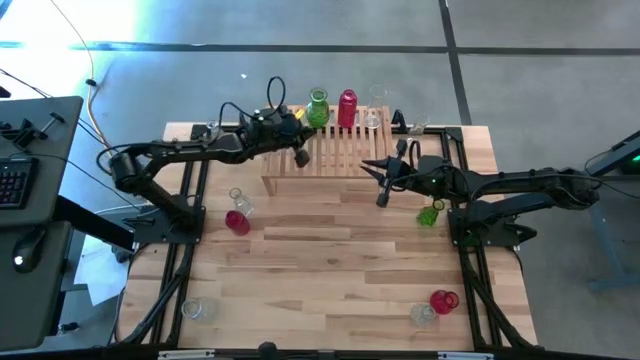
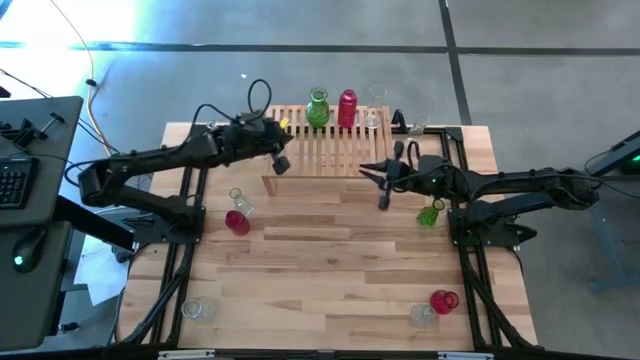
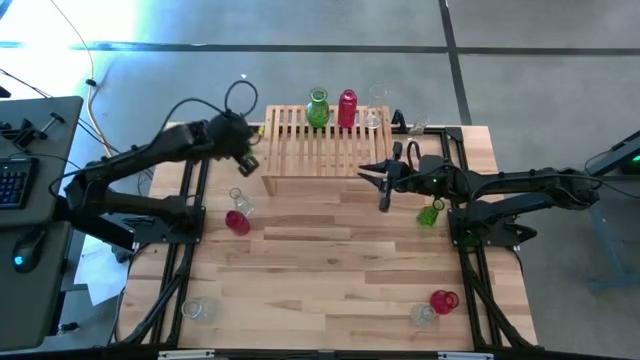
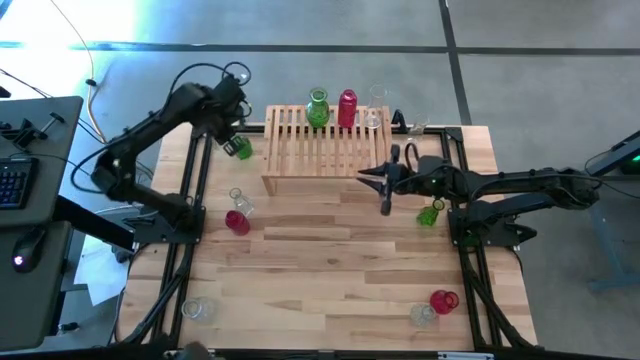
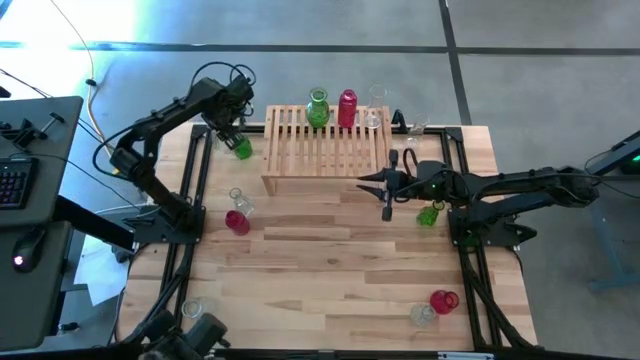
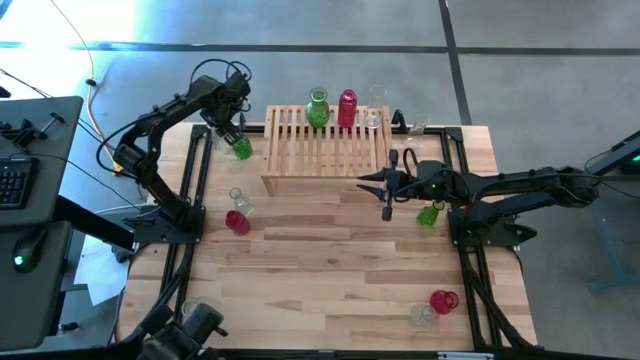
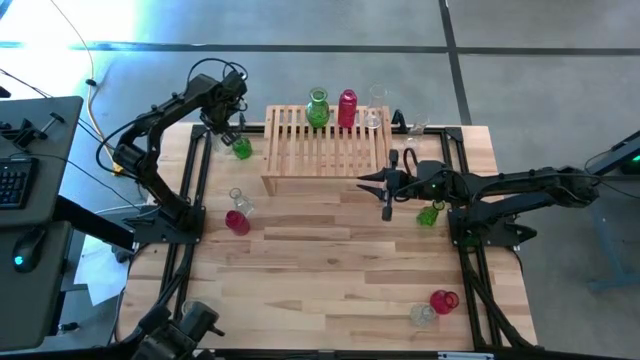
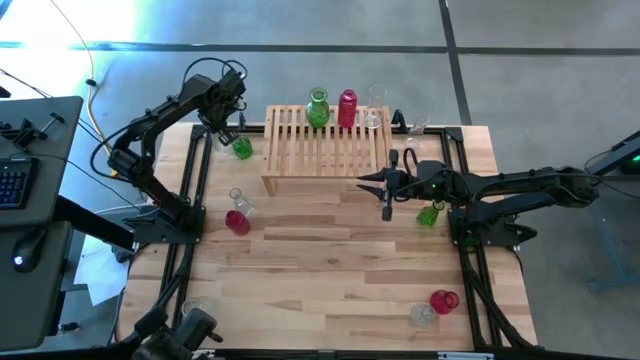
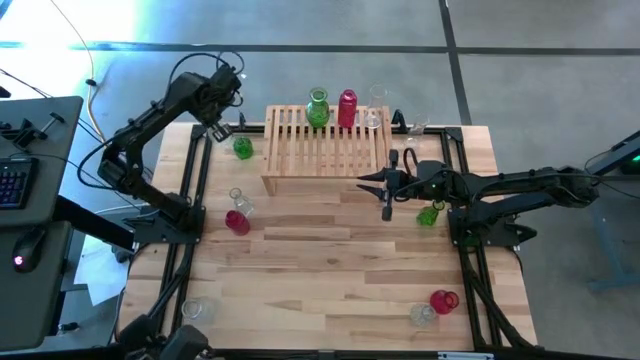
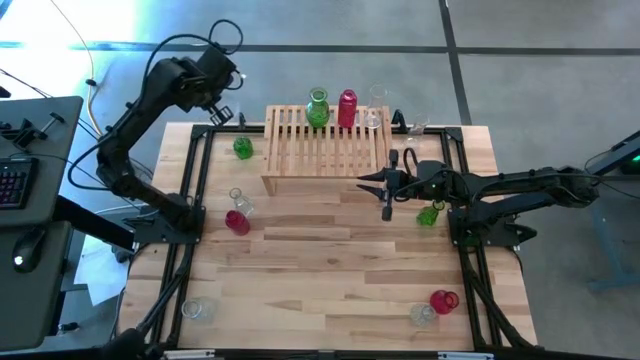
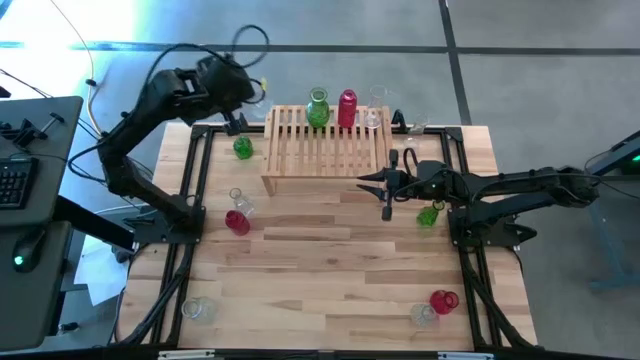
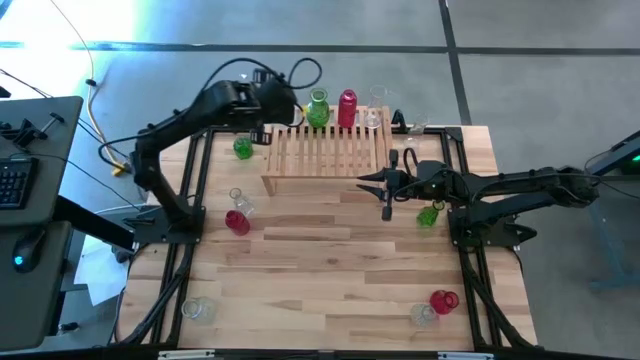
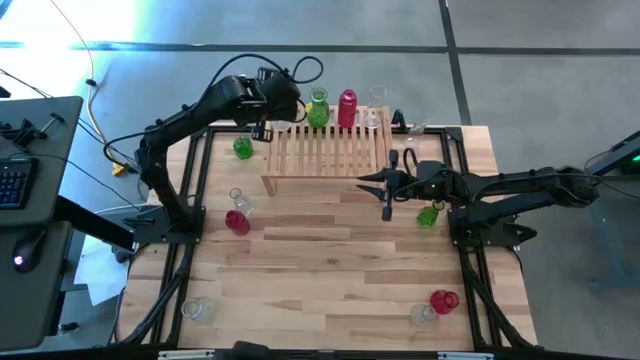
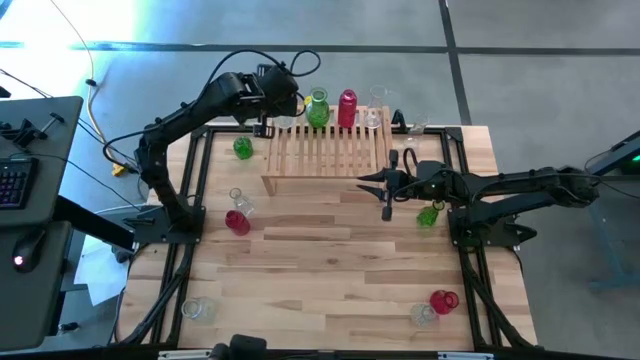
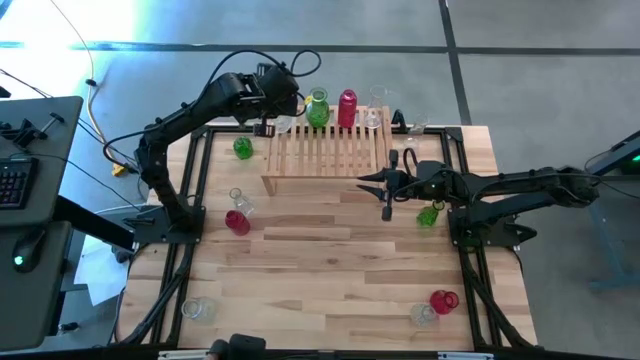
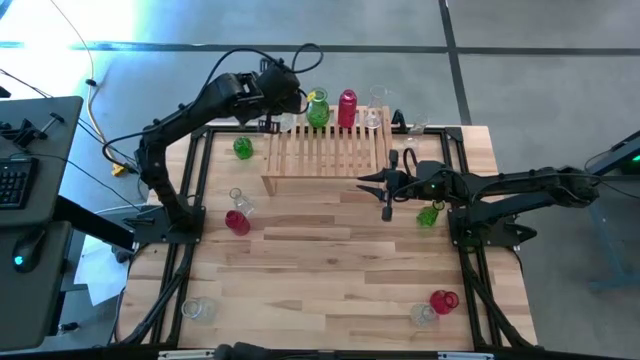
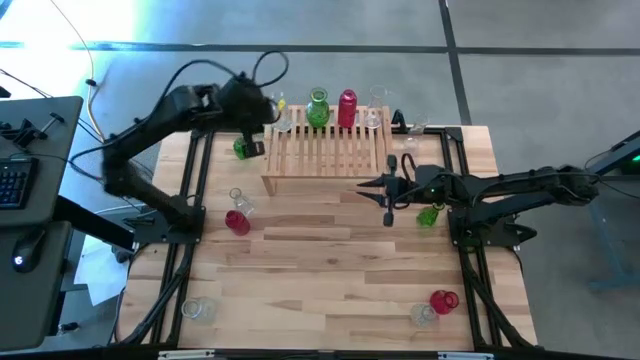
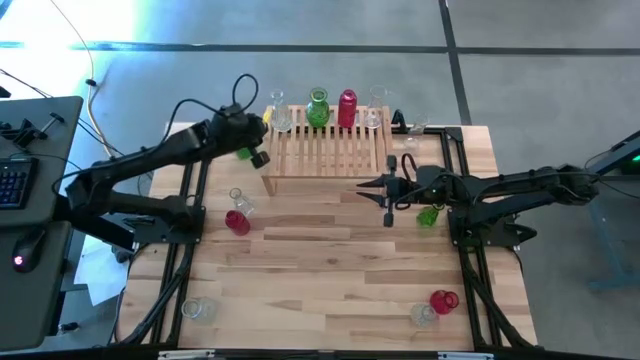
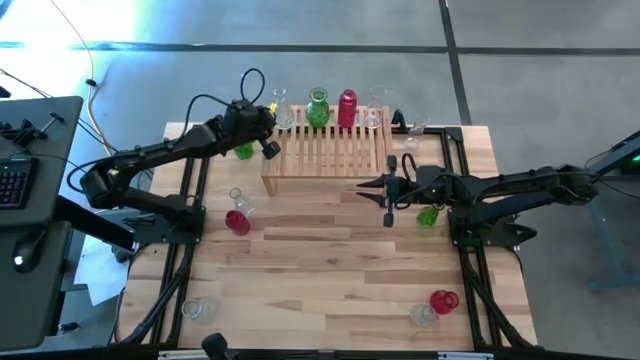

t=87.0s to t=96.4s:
Task: sort vases onto shelf
Put the transparent vase on the shelf

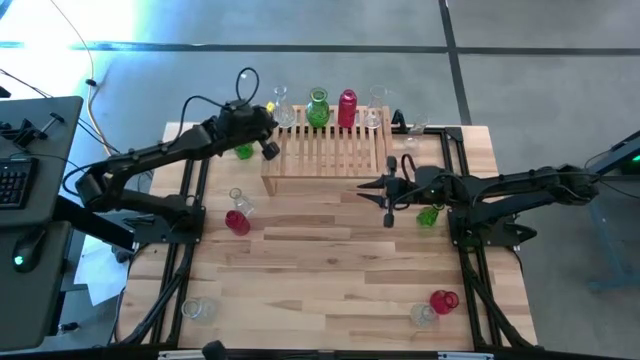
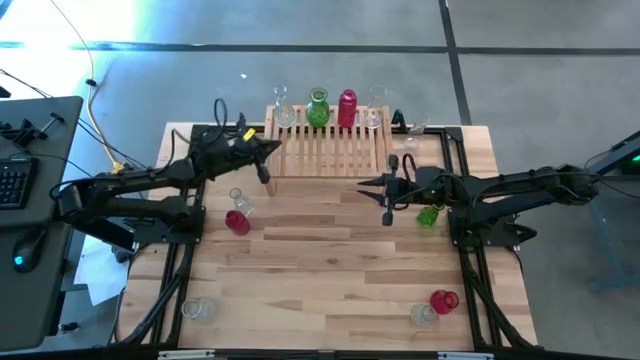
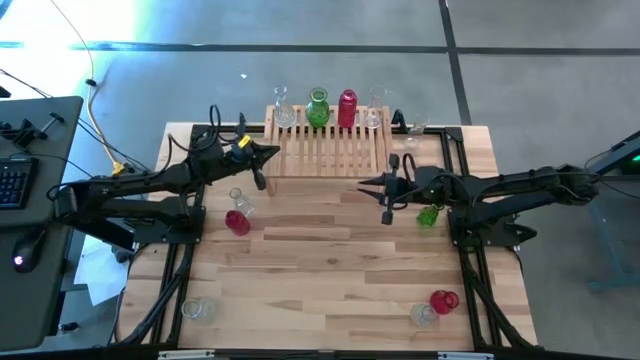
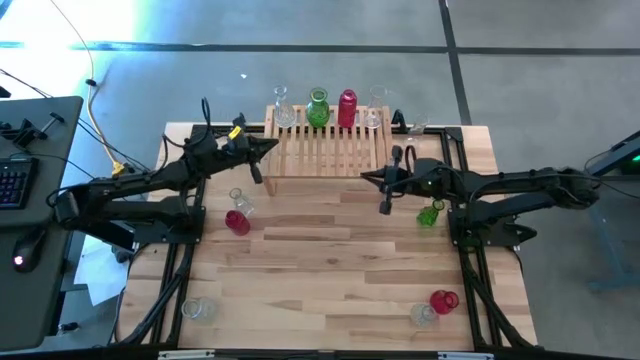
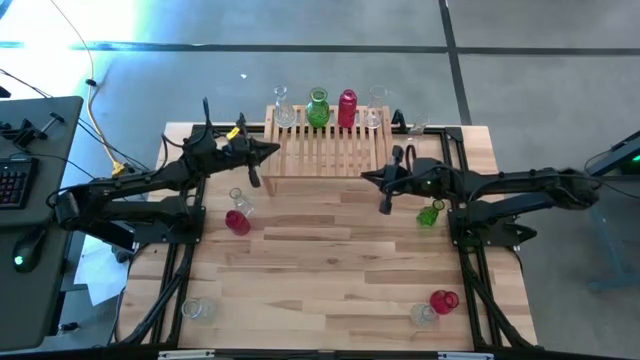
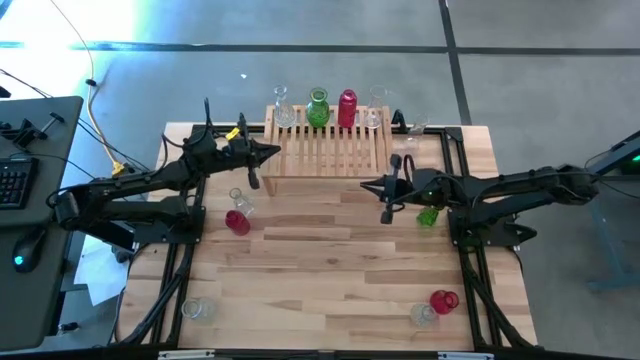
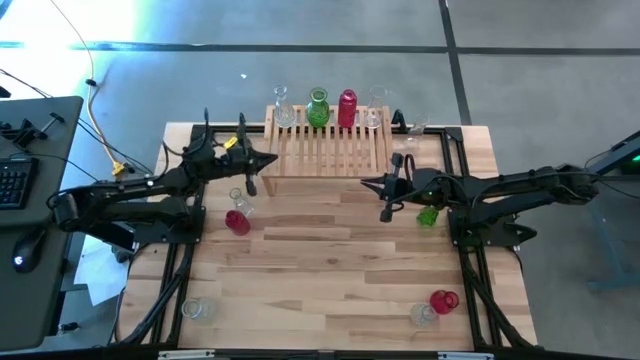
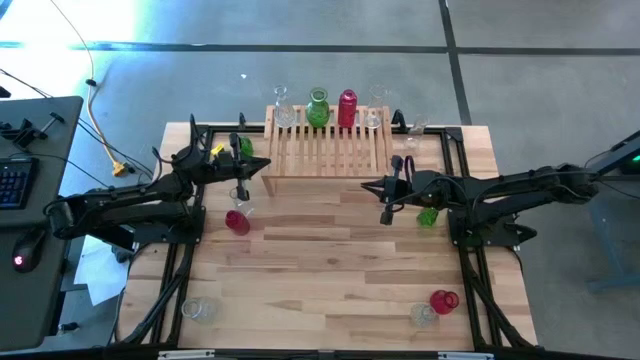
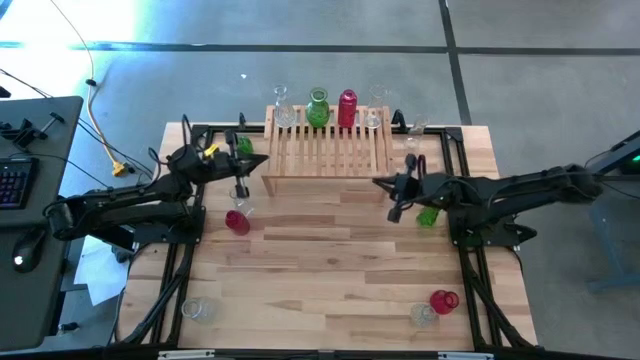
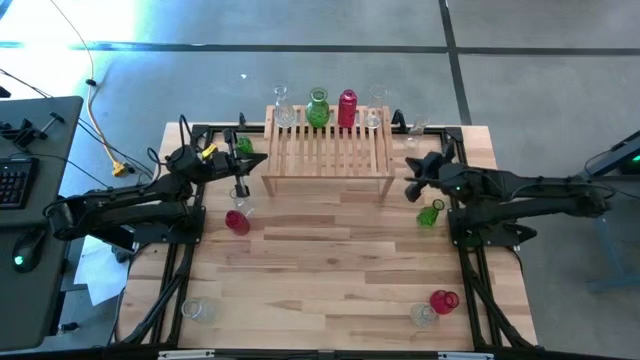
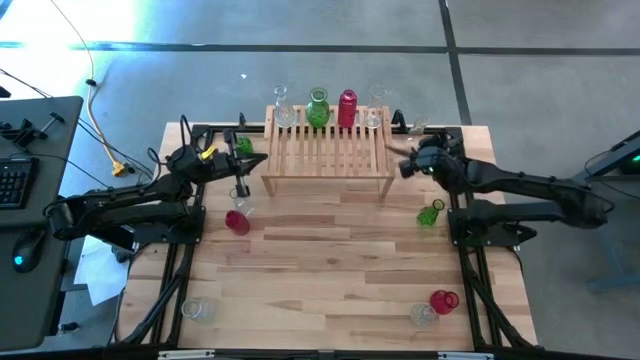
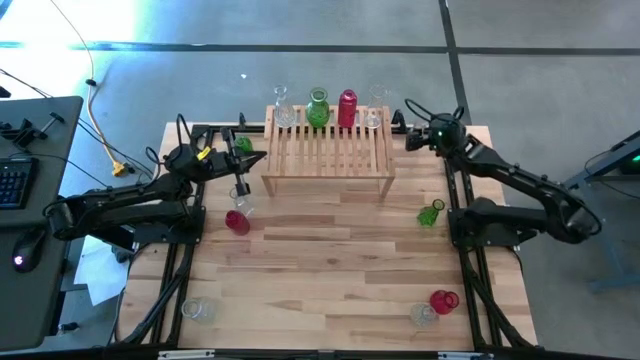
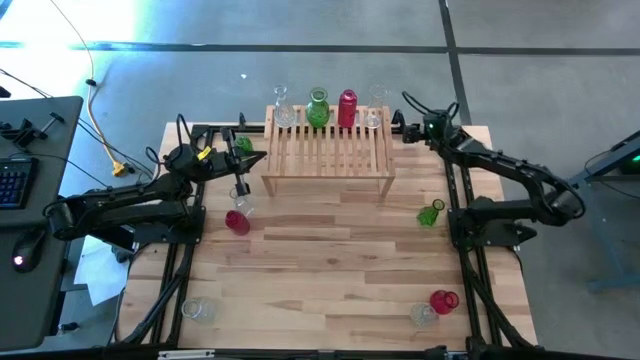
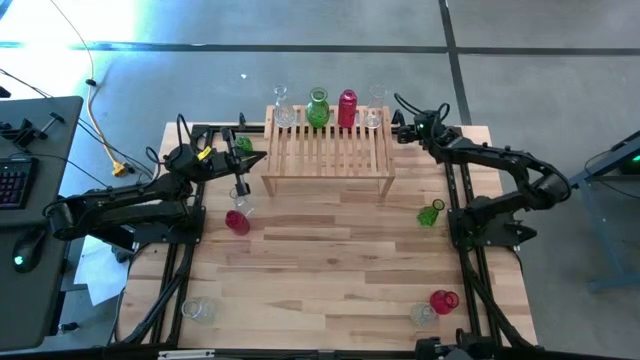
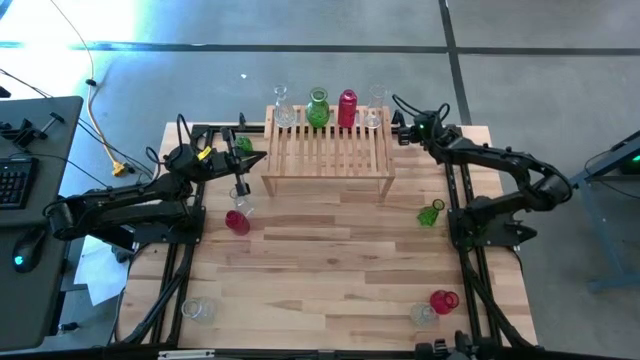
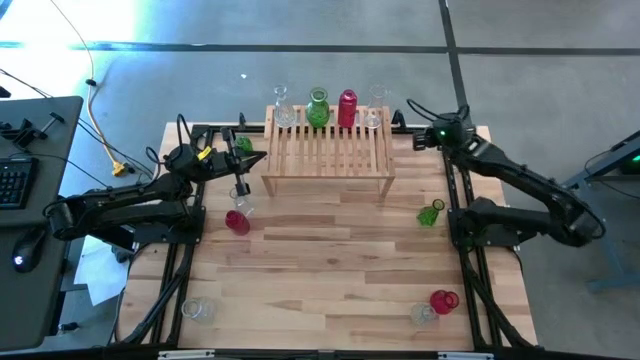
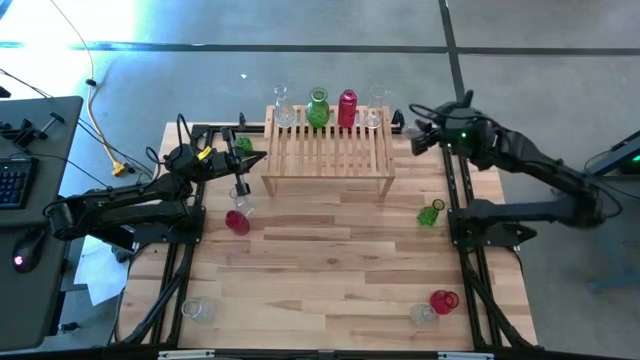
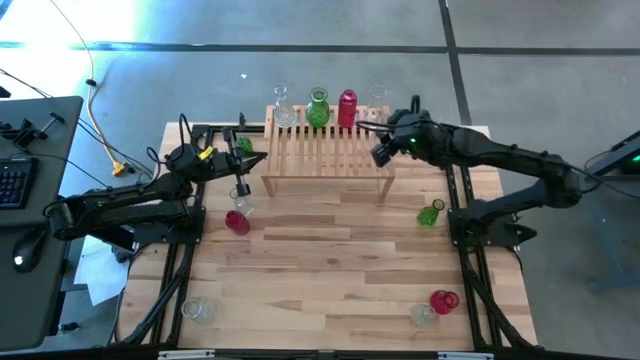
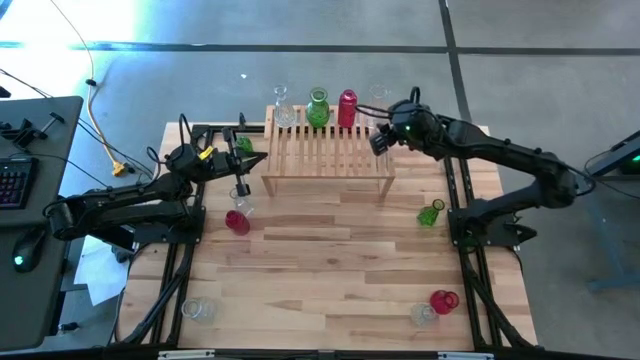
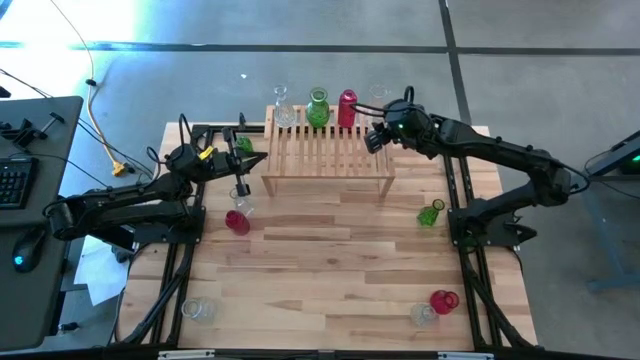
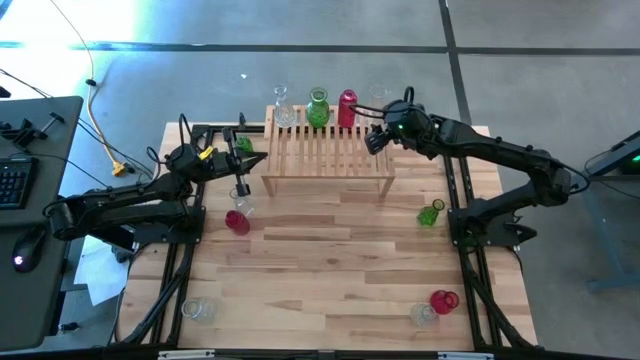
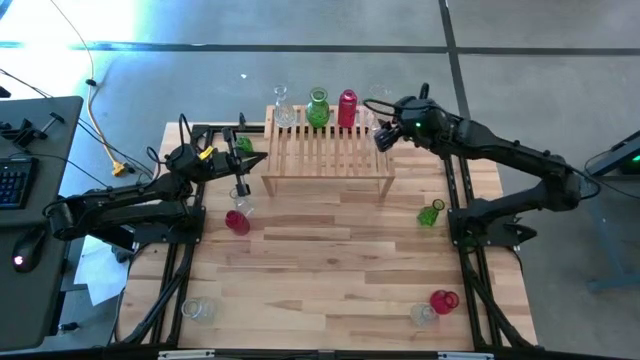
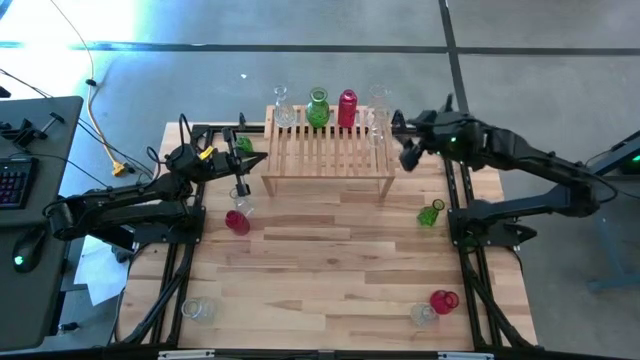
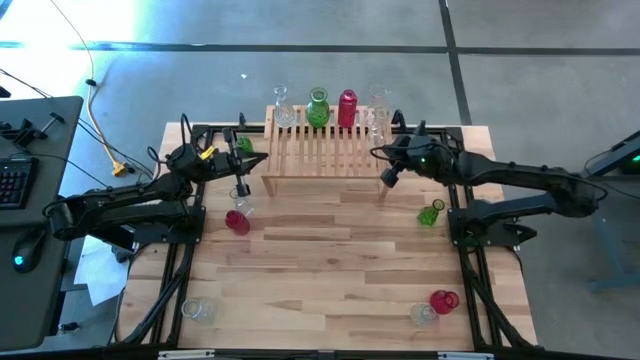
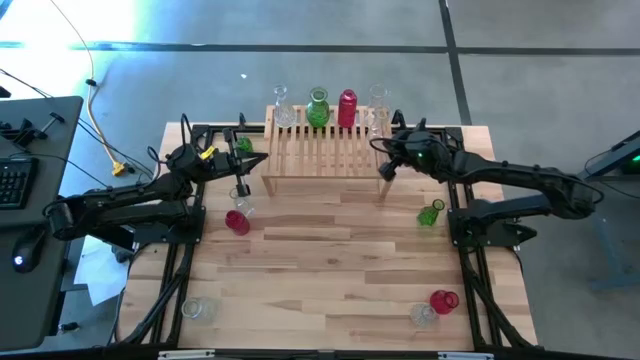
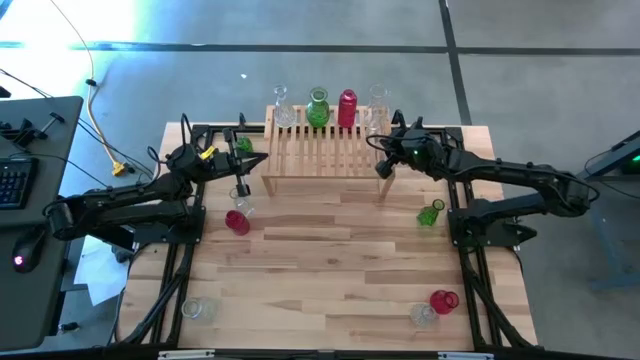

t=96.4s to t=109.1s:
Put the transparent vase on the shelf aligned with the other transparent vase
